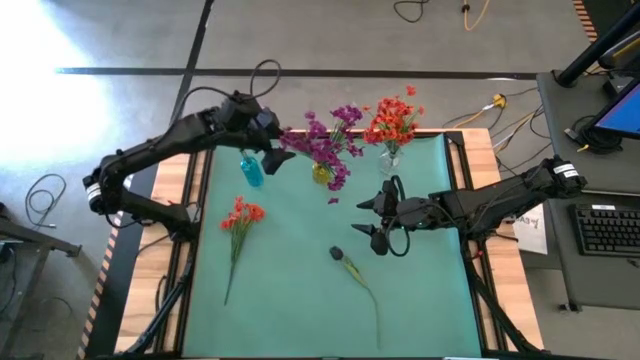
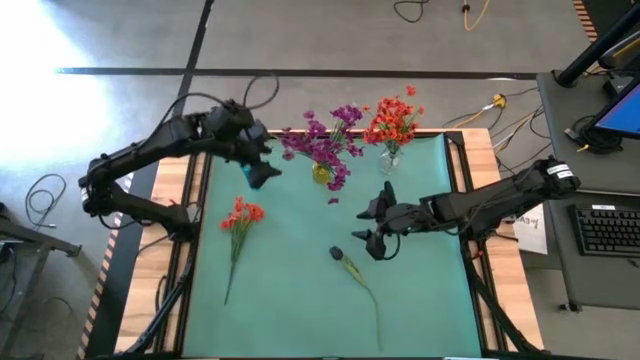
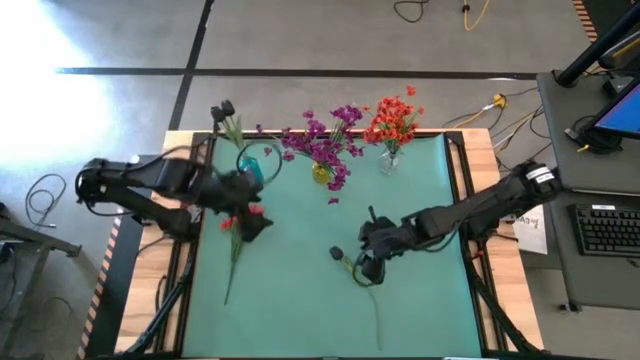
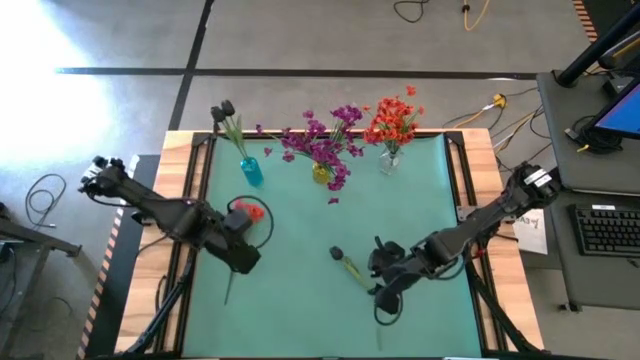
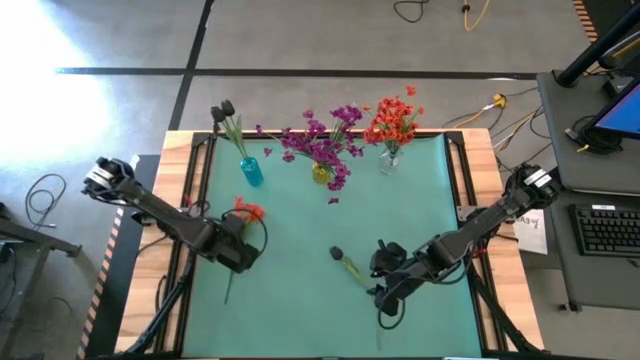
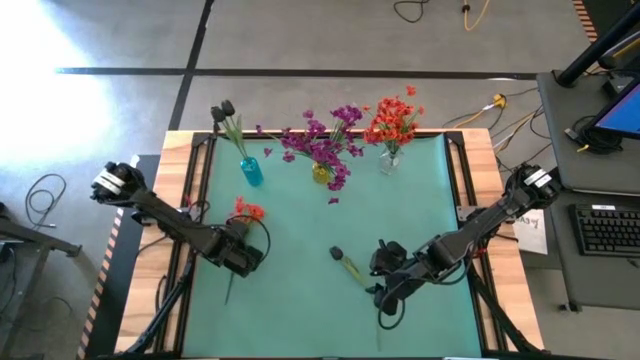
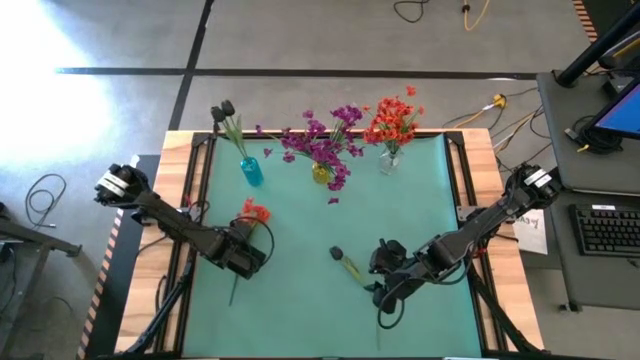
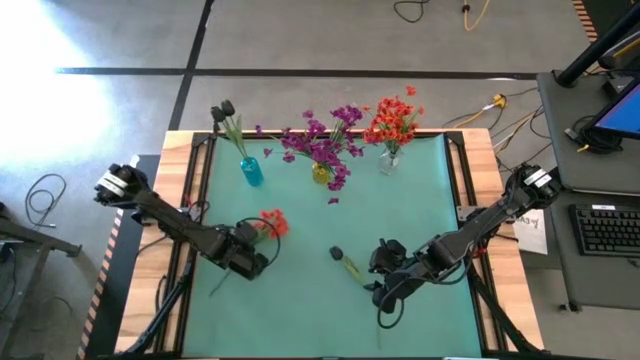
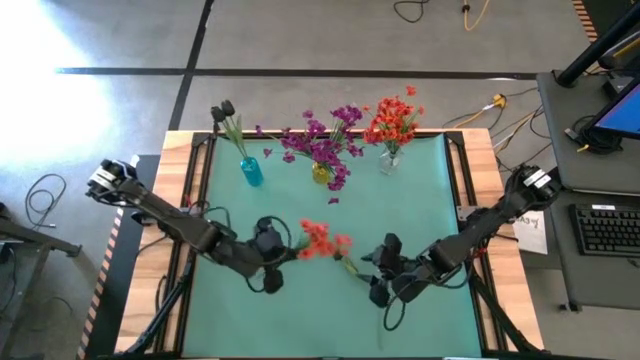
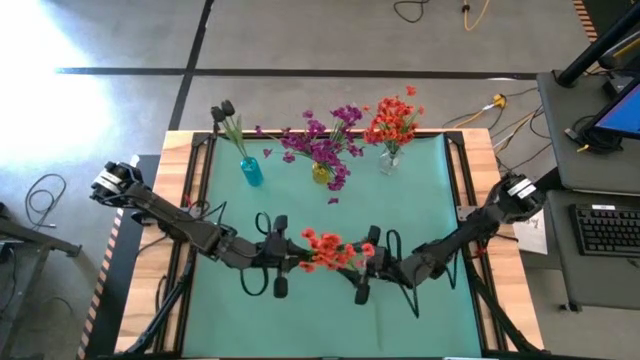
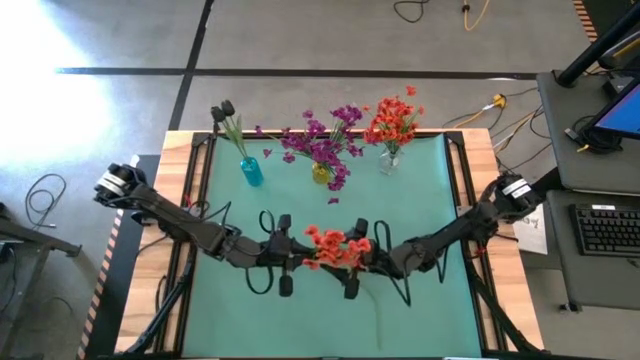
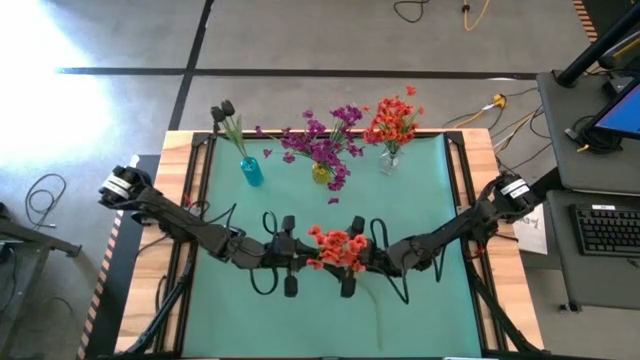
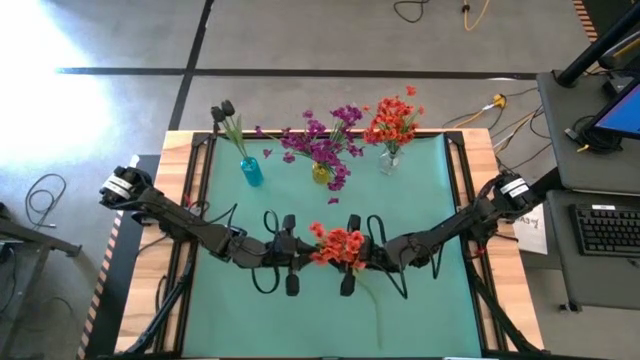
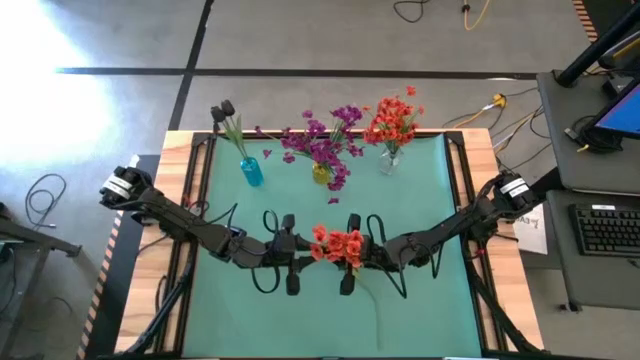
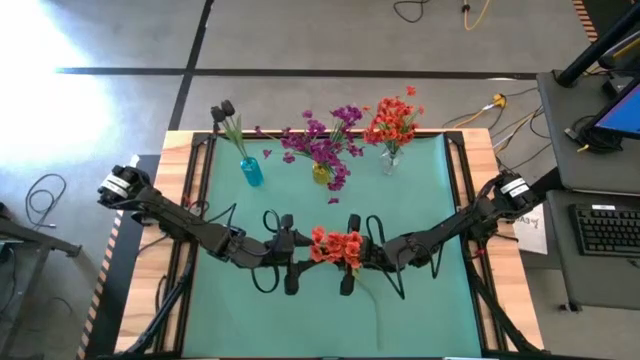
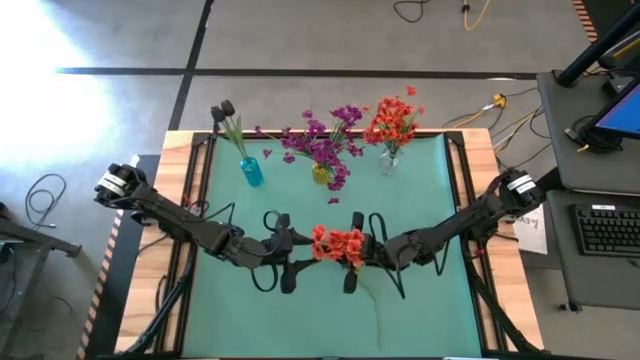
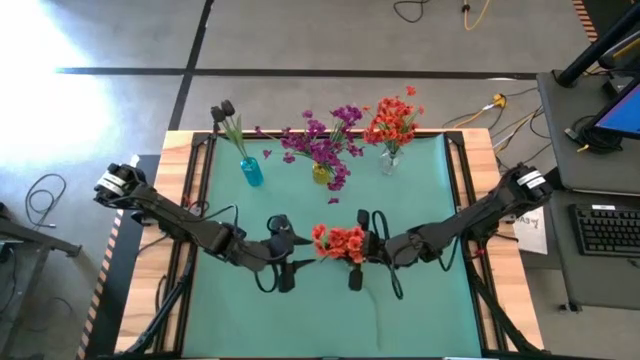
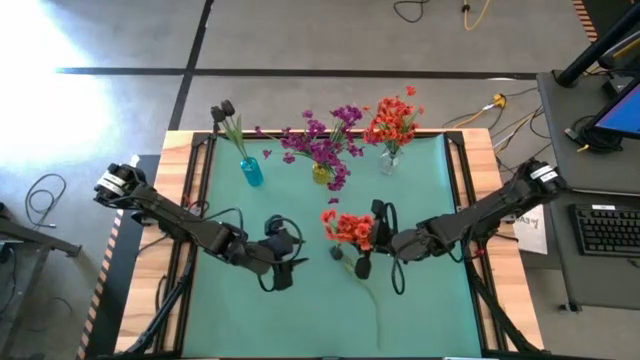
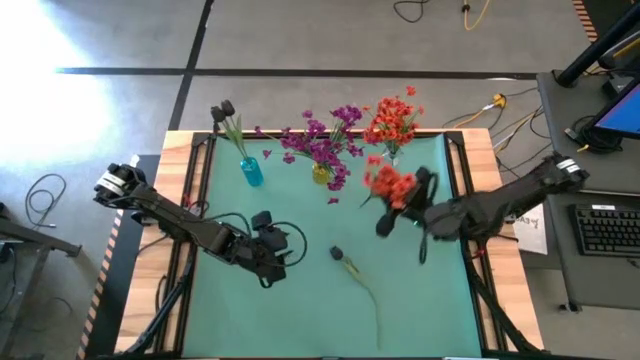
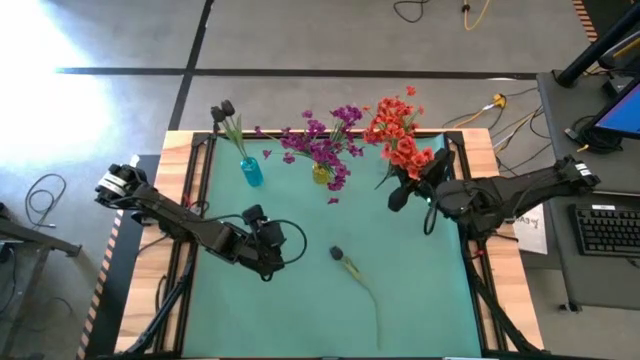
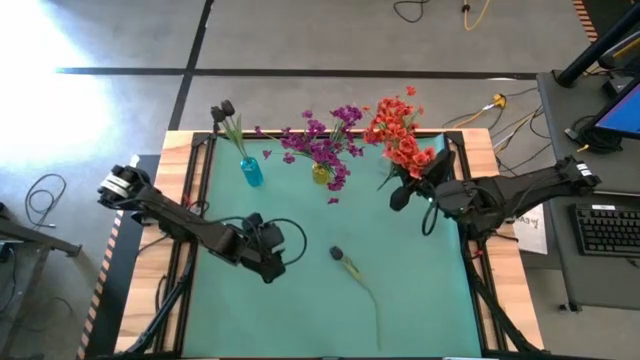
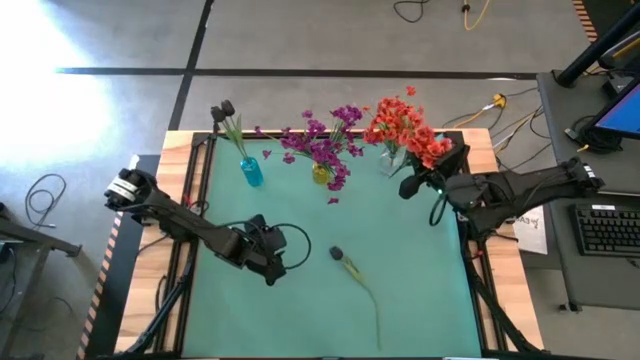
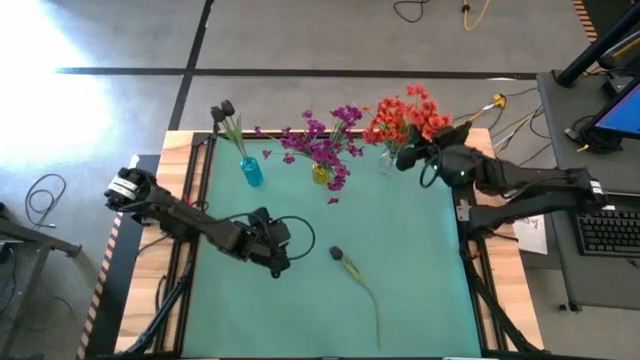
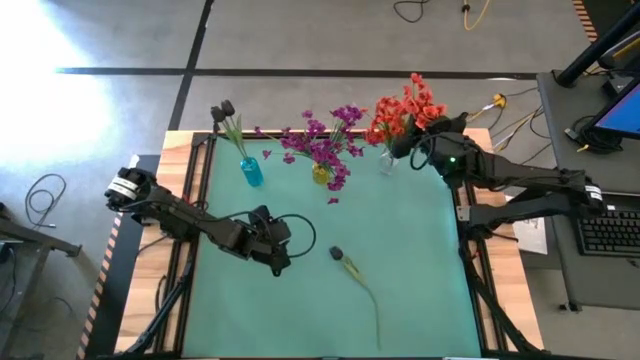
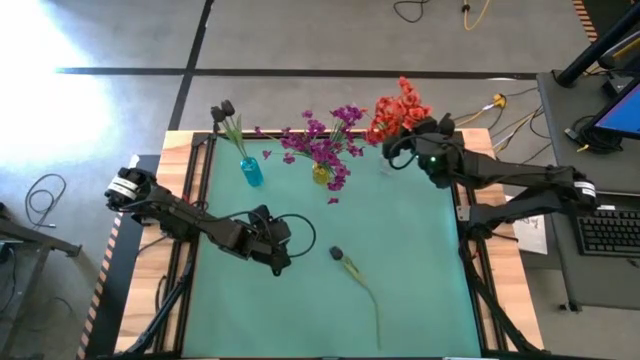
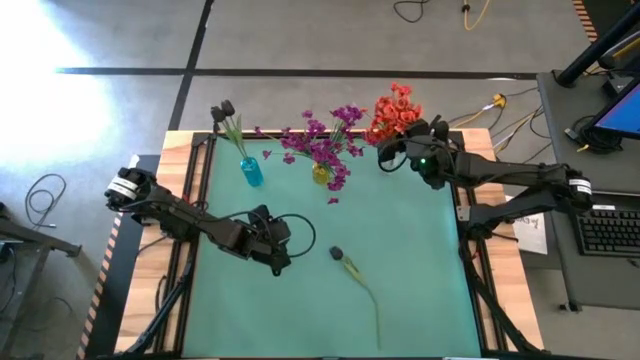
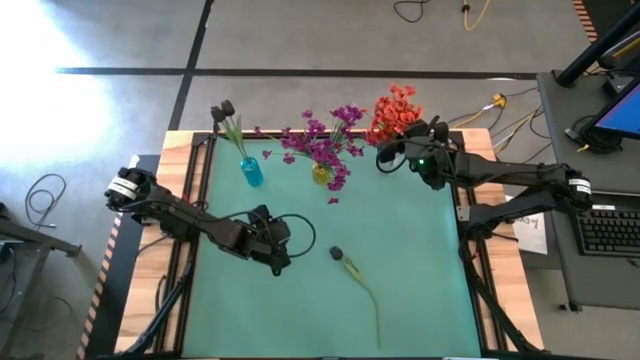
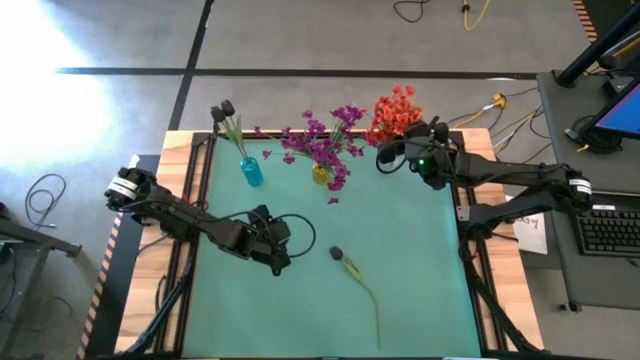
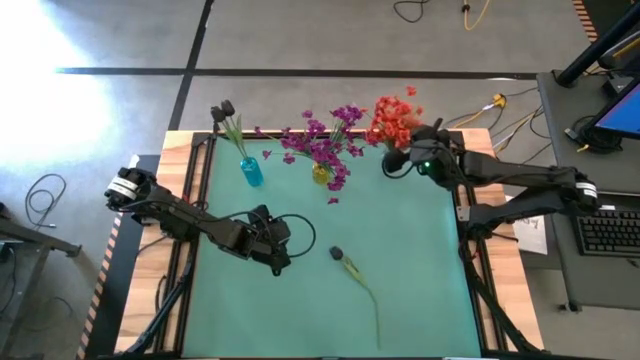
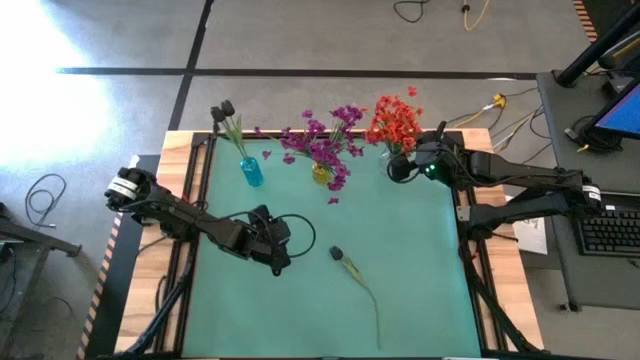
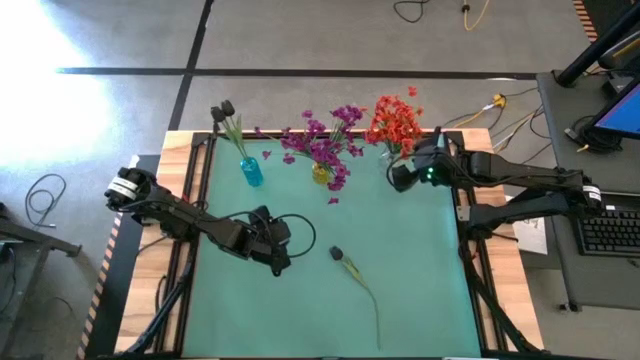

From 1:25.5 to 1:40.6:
Task: Sort flowers into vase by color
Put the orange flowers into the transparent vase

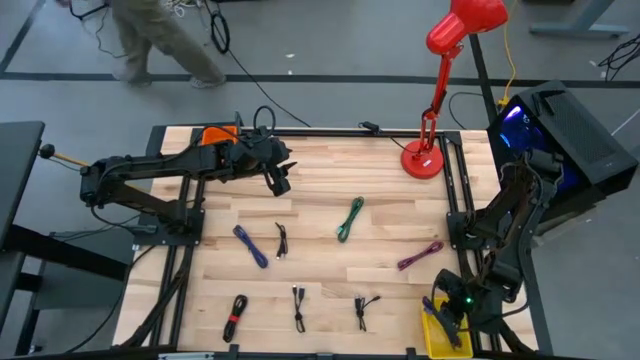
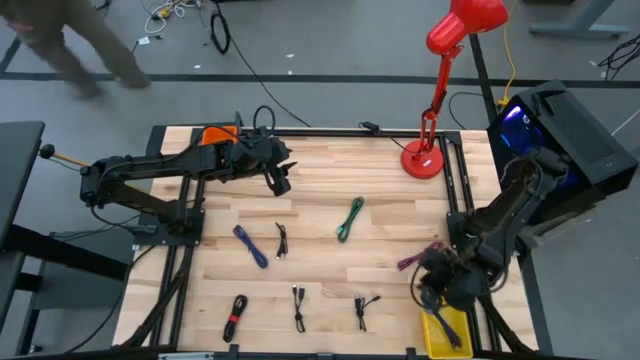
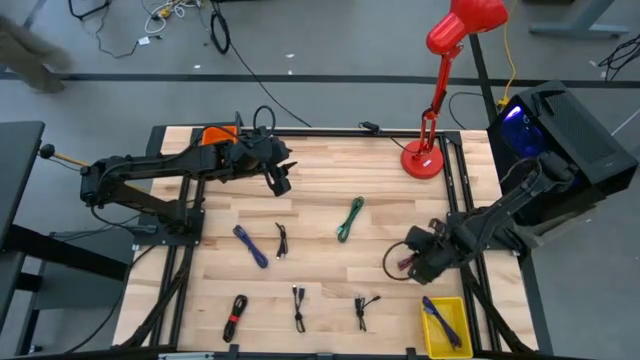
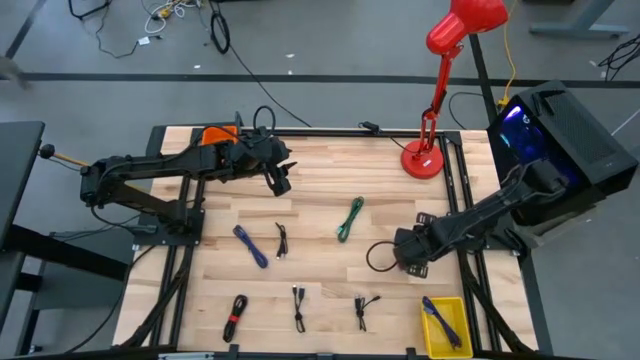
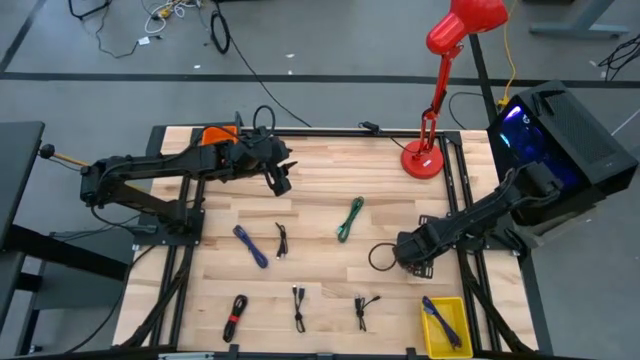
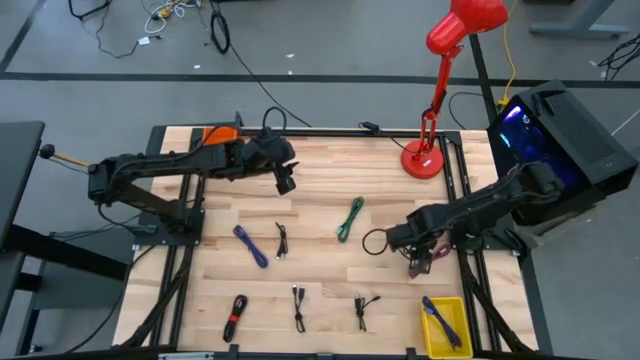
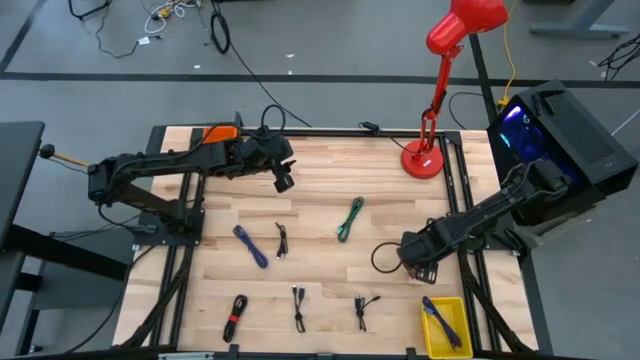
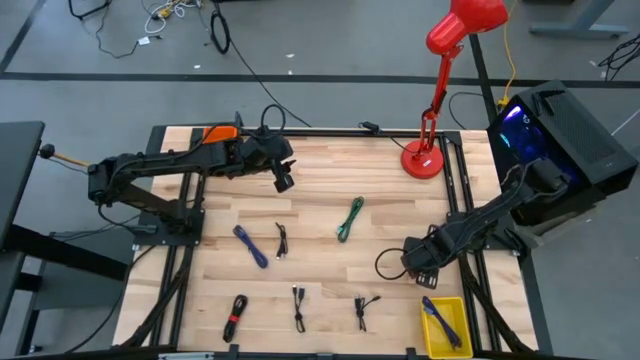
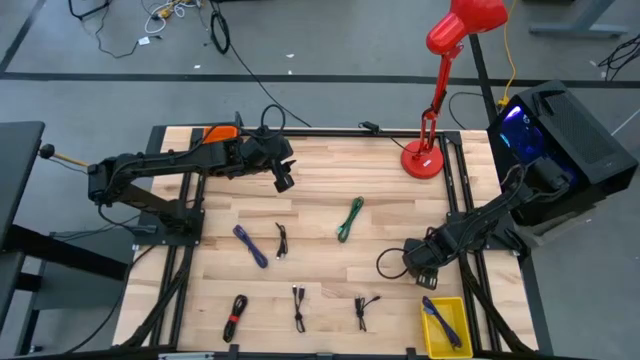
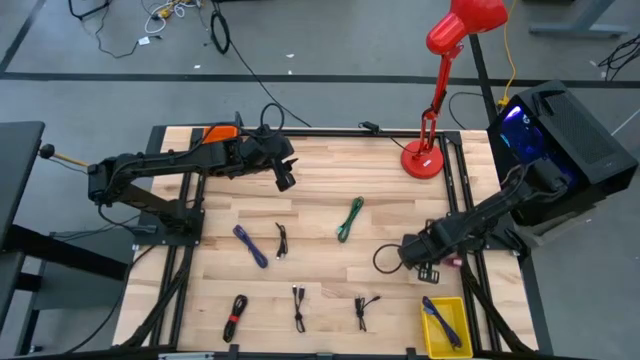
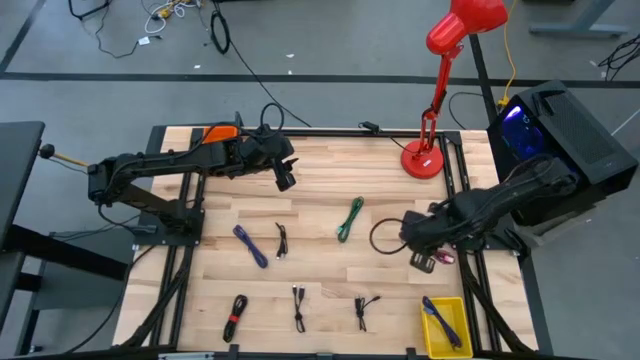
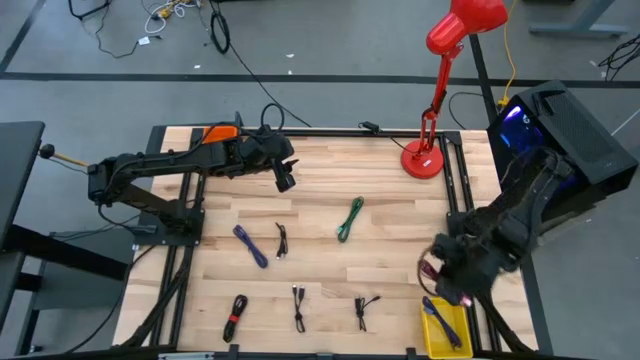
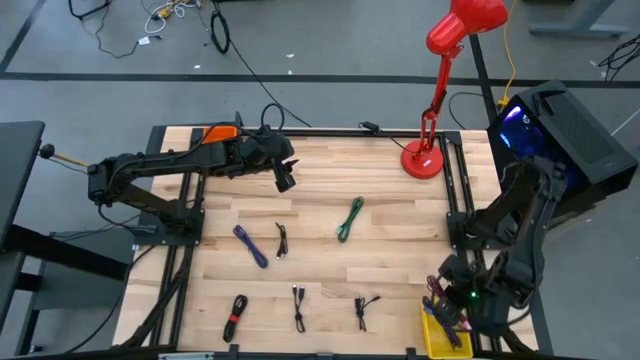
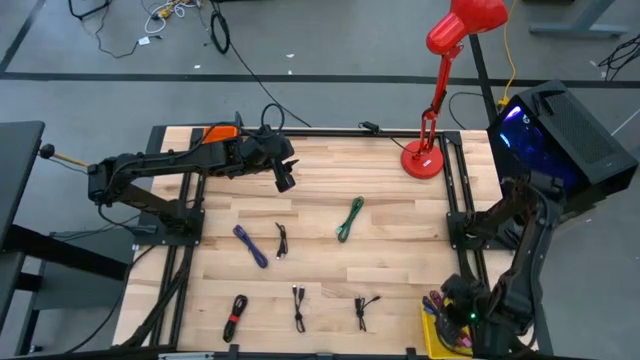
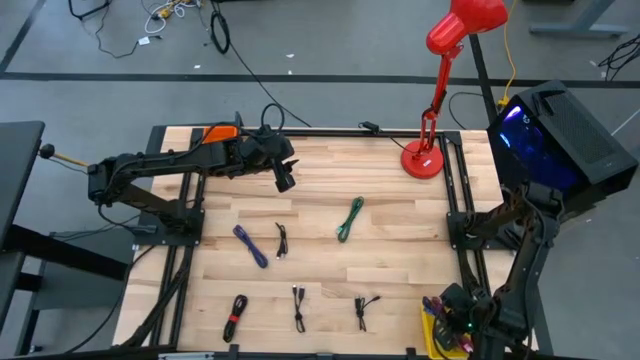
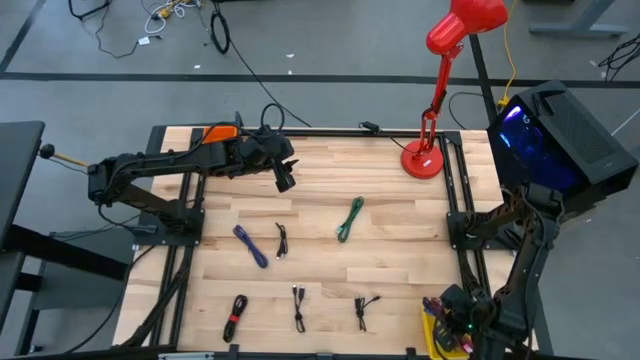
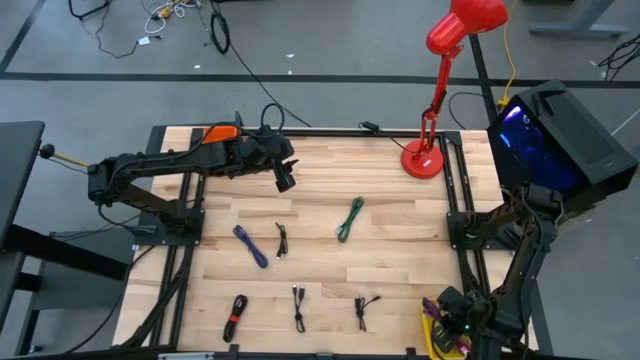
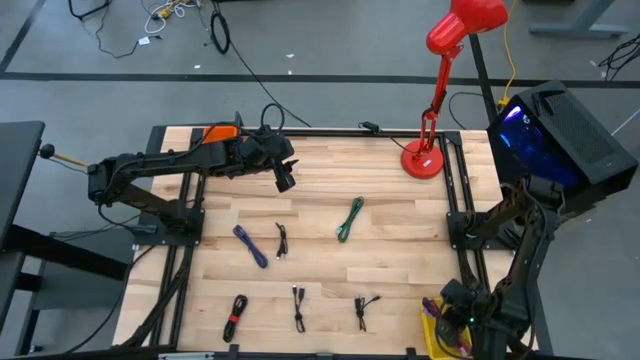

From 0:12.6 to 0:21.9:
Task: Pick & Place USB Port
Put the pink patterned charger cable into the yellow bin
